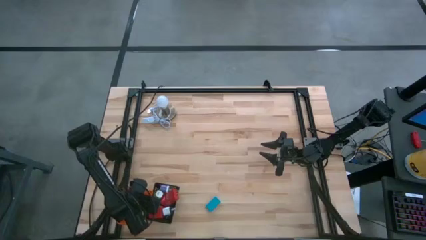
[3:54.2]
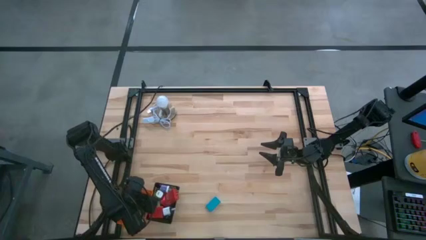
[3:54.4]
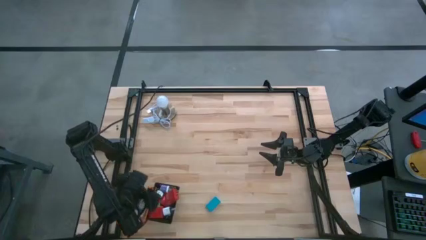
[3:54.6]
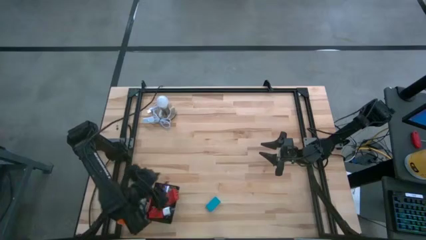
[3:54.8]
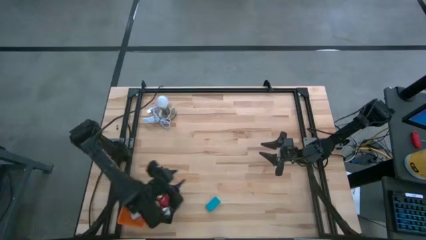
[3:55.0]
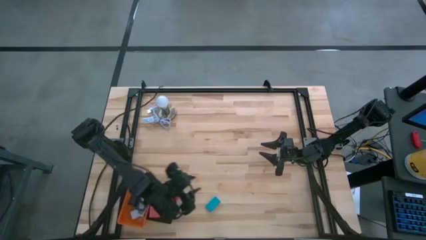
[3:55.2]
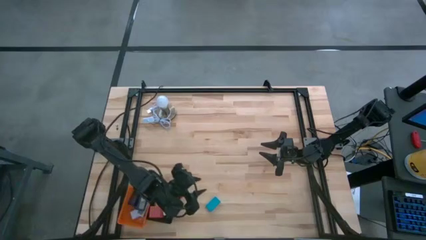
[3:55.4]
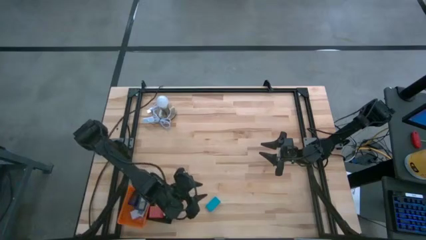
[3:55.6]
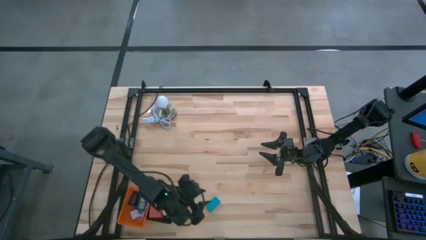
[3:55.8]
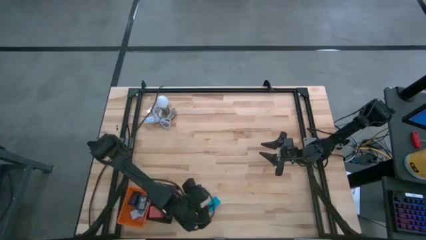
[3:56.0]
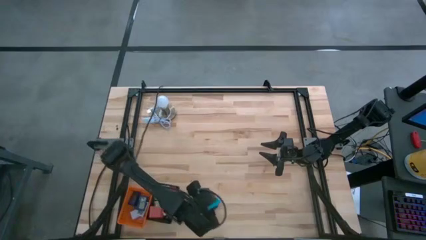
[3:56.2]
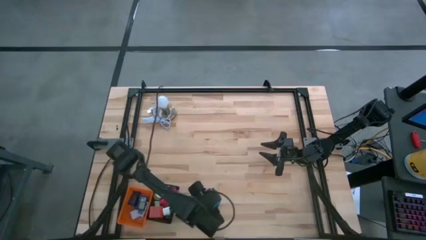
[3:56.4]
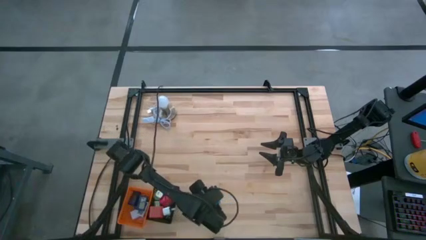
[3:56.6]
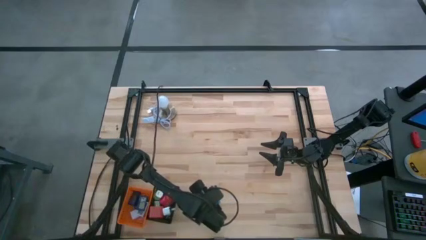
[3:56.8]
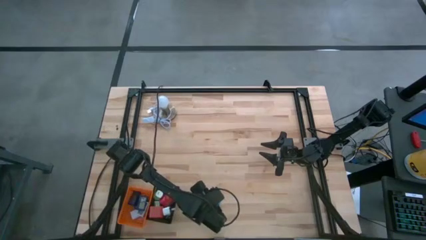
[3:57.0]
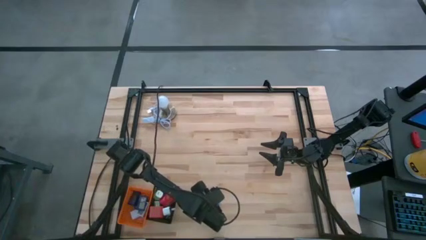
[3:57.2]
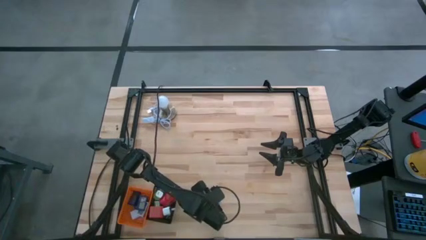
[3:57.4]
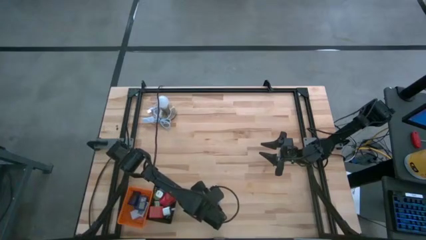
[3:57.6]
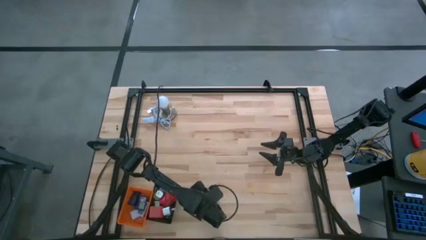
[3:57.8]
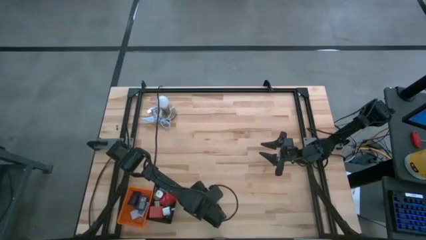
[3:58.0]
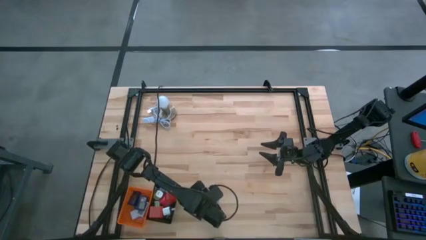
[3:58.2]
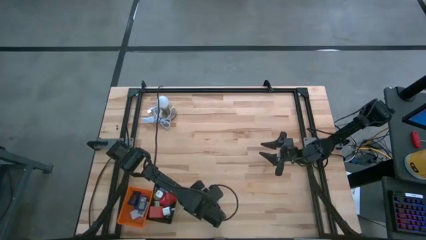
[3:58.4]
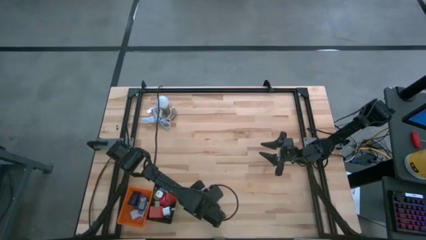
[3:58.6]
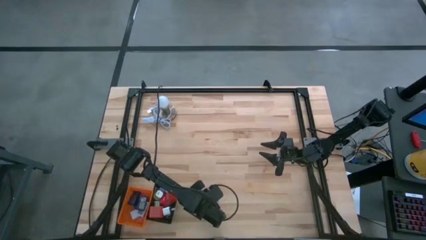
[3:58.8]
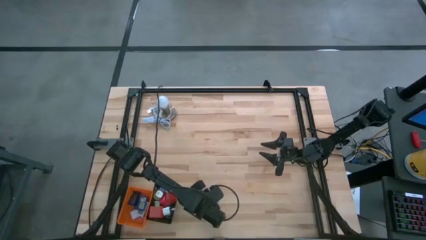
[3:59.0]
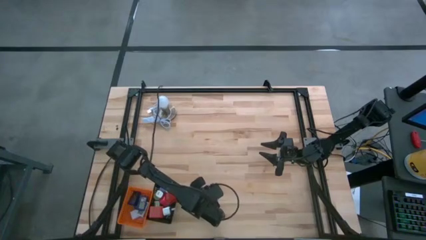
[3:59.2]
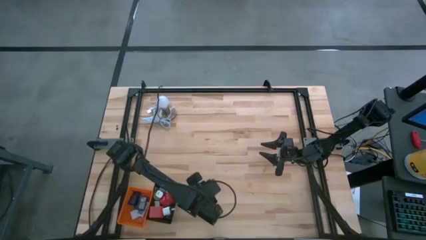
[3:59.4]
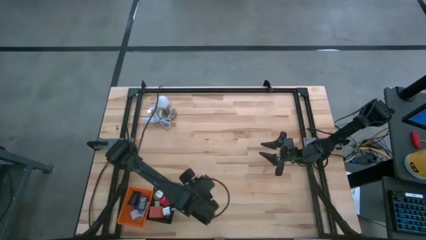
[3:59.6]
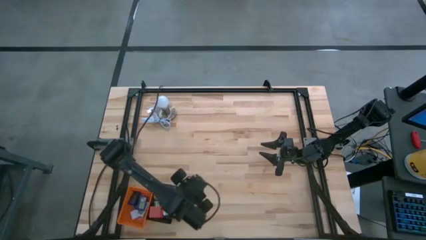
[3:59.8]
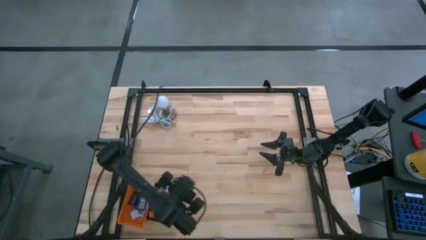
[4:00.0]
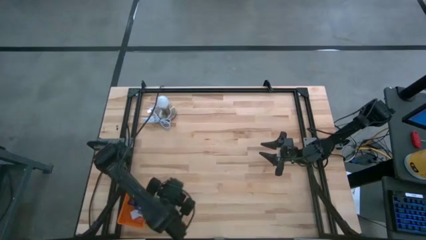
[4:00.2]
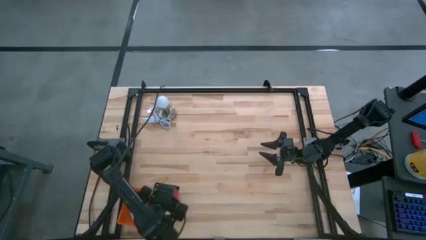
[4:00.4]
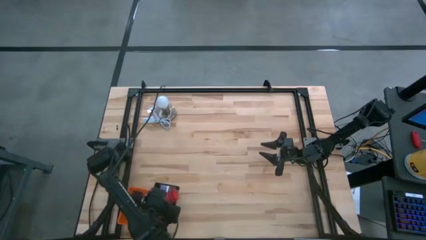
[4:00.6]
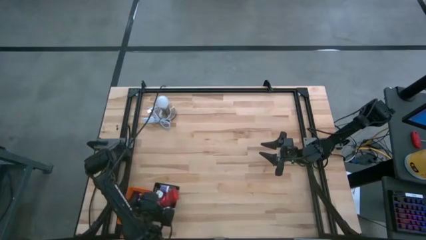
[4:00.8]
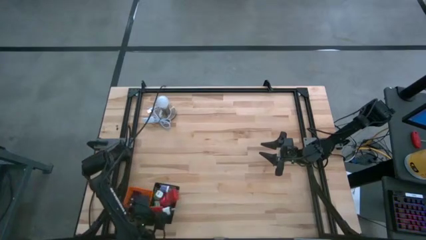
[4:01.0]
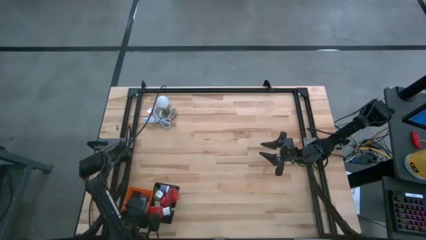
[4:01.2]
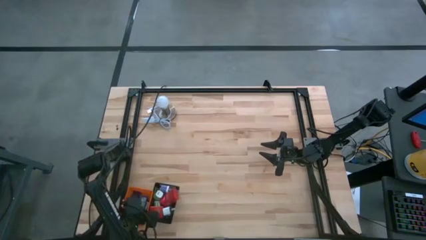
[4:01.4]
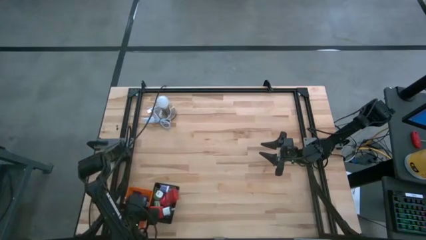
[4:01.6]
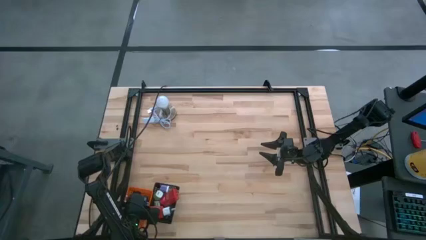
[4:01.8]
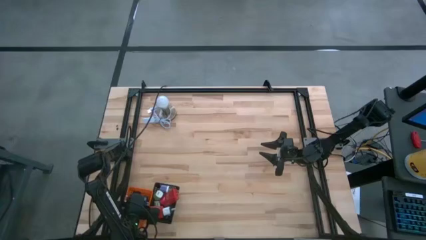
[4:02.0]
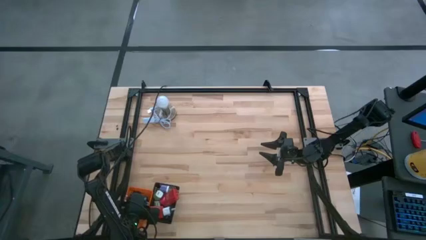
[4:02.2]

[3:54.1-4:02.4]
Task: Pick & Place Office items
Put the blue digital clock into the orange basket

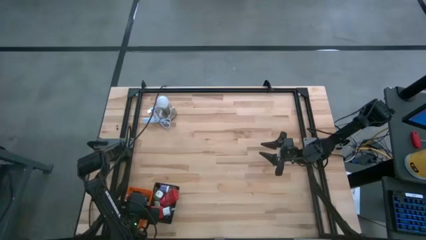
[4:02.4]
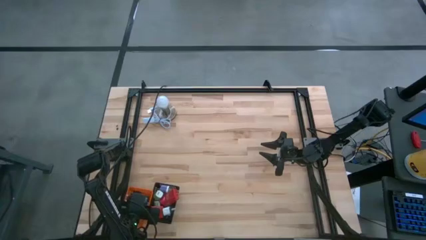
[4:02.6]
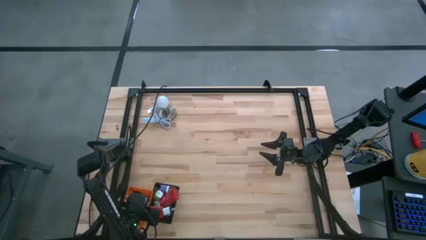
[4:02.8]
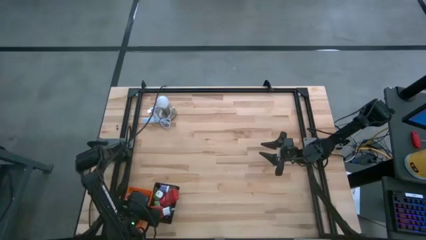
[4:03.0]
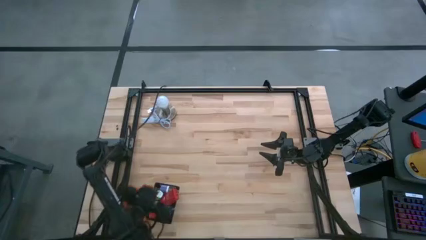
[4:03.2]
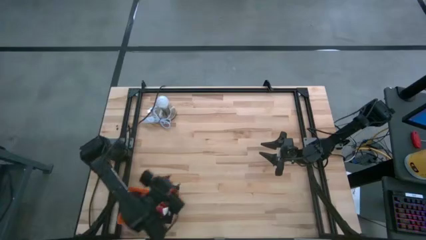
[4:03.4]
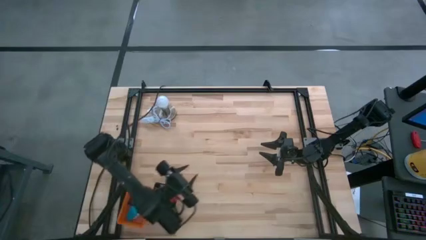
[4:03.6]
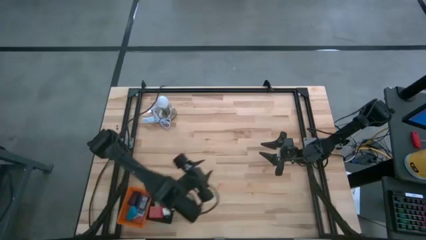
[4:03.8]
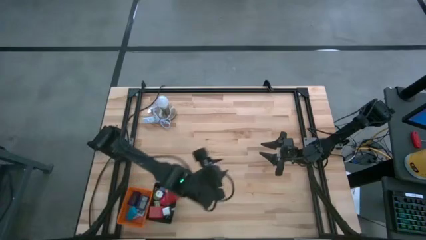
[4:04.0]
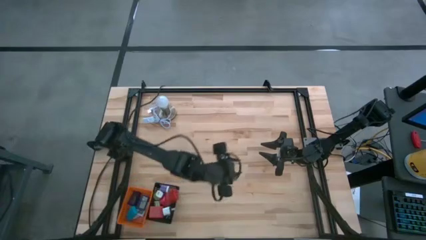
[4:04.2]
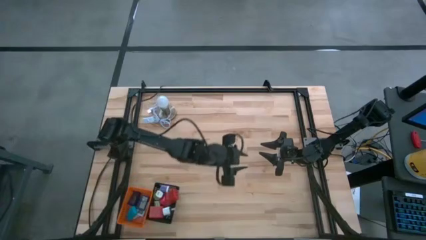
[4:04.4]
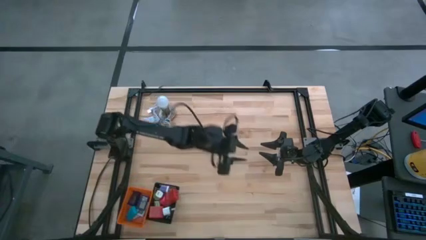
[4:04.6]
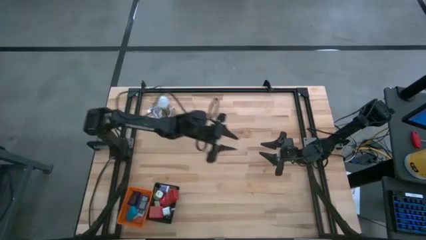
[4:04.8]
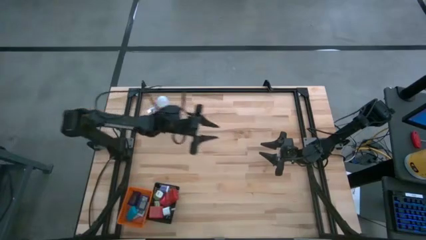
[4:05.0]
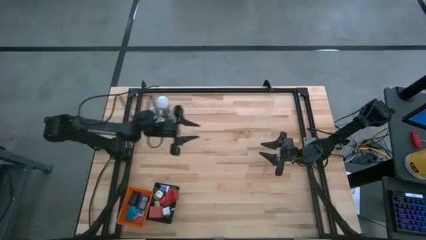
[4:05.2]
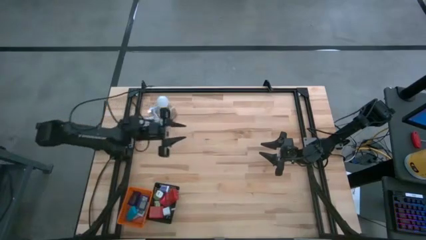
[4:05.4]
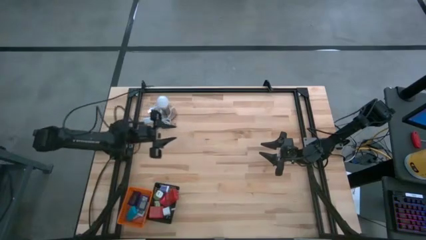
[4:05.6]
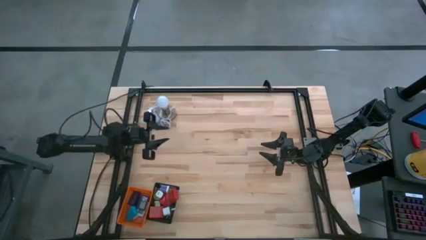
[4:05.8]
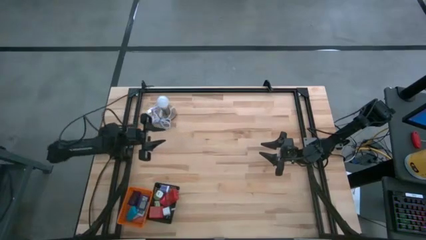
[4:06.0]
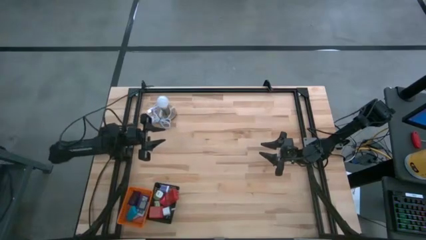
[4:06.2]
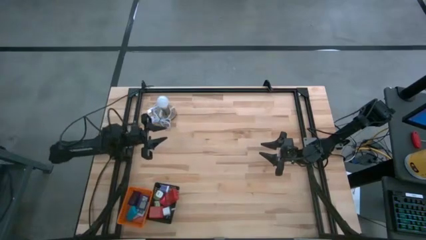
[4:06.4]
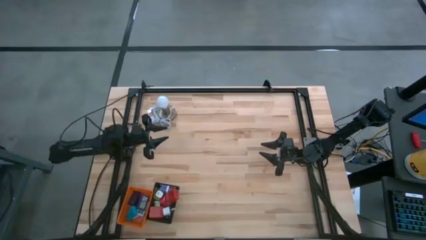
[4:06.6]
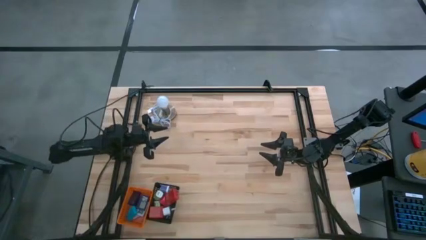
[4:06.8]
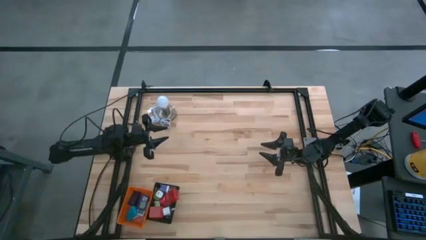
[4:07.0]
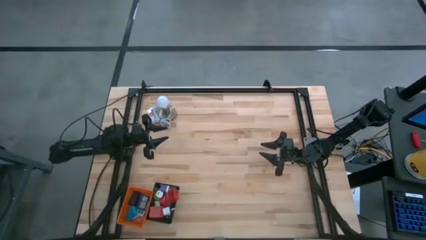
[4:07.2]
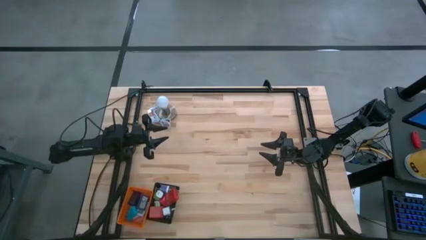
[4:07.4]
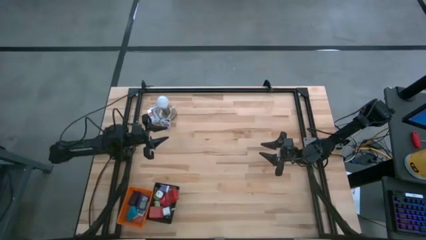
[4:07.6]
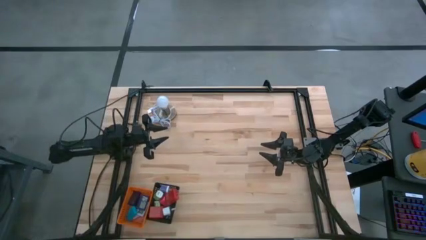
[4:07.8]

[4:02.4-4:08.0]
Return to Home Position
